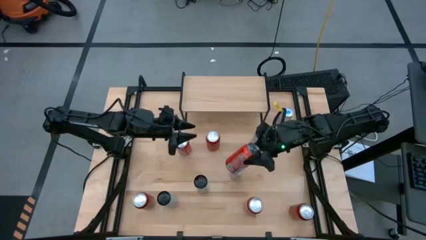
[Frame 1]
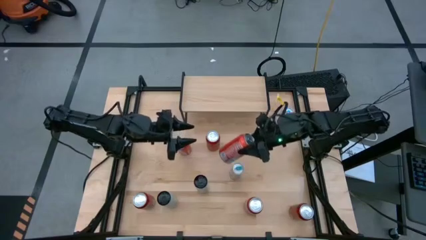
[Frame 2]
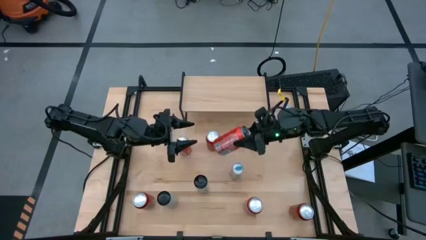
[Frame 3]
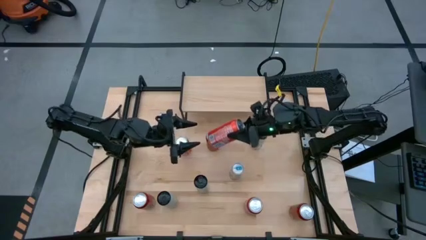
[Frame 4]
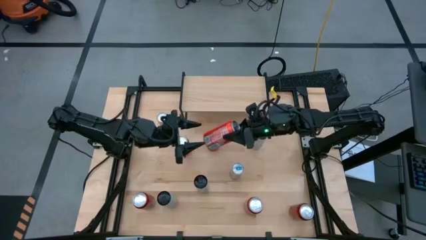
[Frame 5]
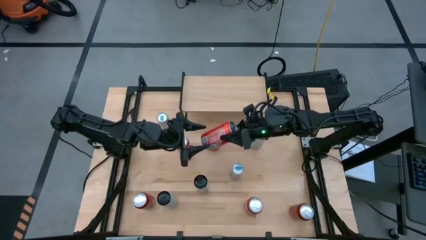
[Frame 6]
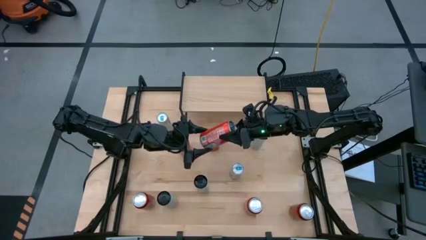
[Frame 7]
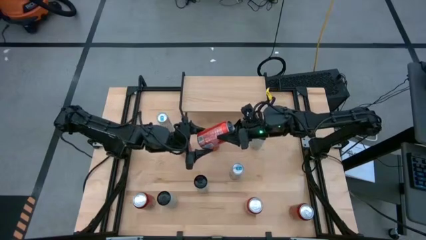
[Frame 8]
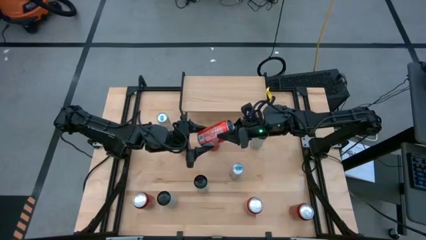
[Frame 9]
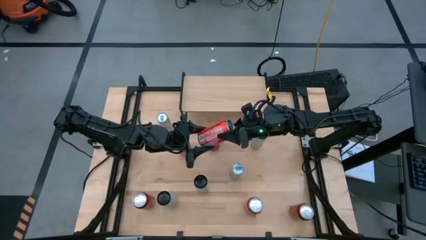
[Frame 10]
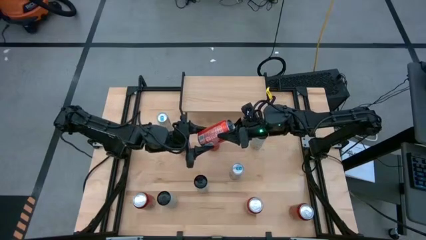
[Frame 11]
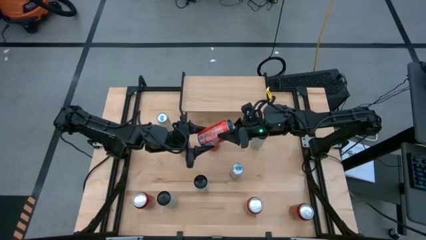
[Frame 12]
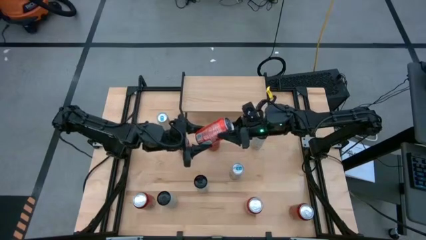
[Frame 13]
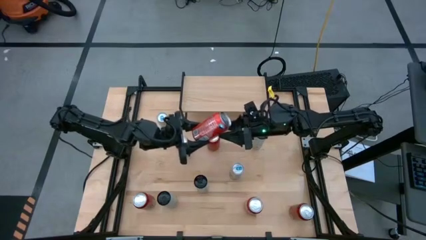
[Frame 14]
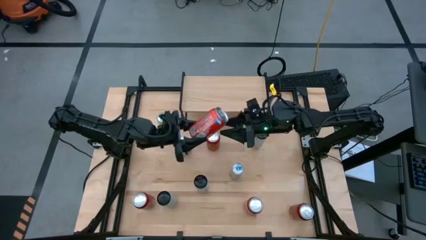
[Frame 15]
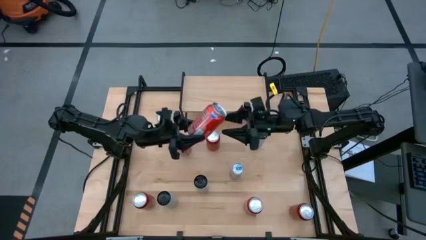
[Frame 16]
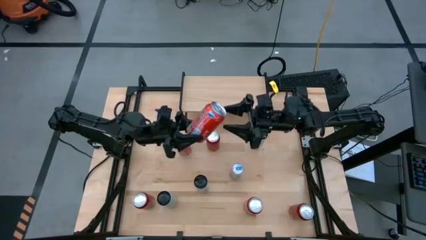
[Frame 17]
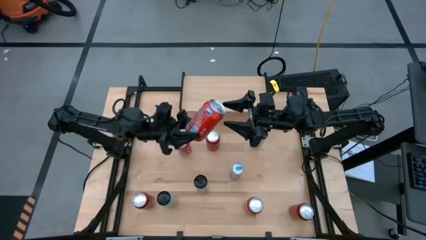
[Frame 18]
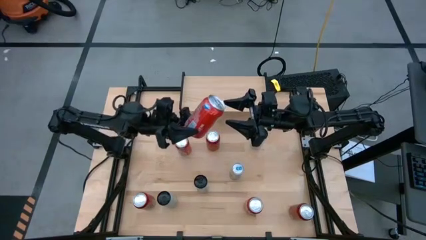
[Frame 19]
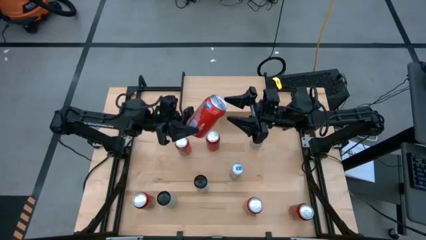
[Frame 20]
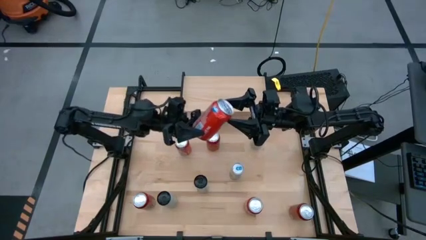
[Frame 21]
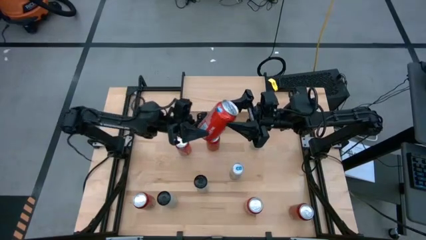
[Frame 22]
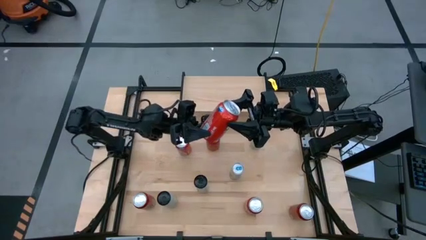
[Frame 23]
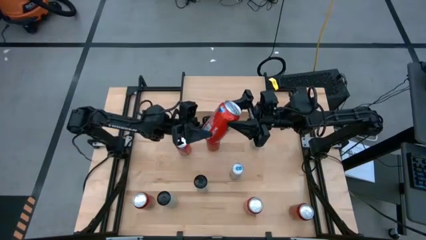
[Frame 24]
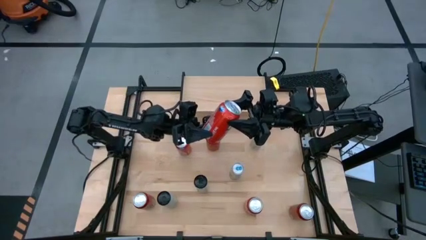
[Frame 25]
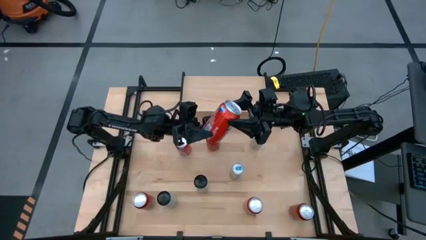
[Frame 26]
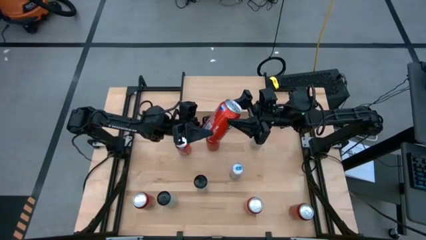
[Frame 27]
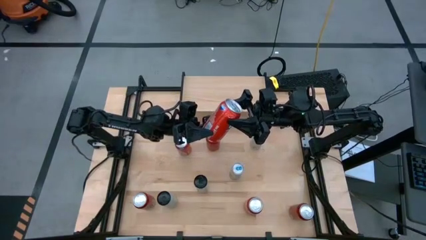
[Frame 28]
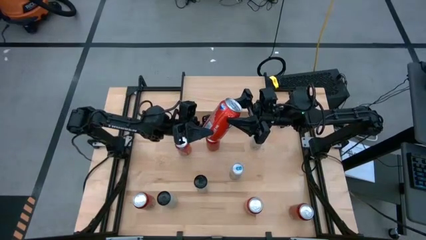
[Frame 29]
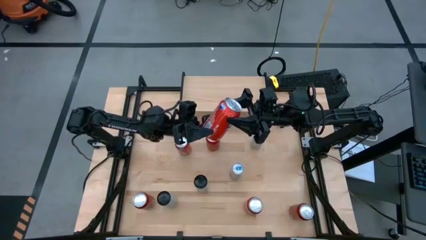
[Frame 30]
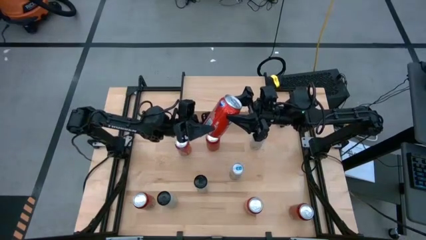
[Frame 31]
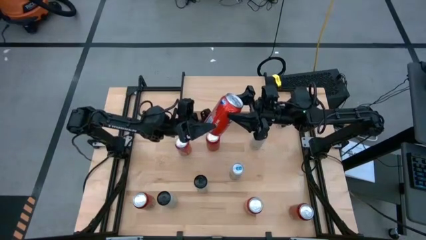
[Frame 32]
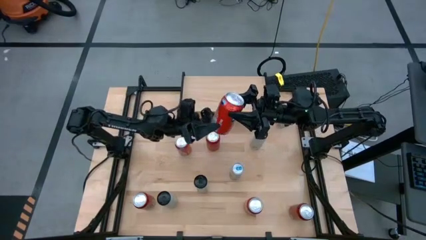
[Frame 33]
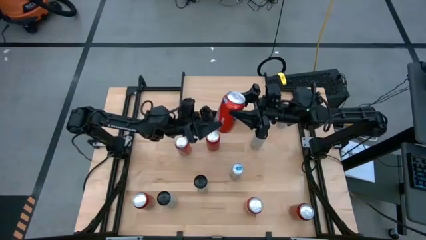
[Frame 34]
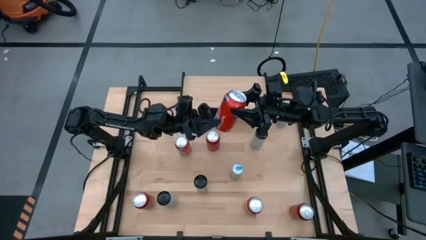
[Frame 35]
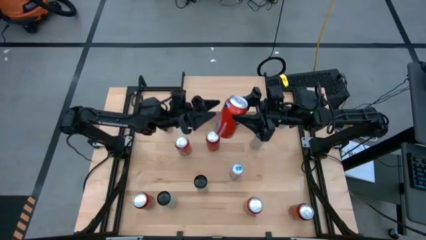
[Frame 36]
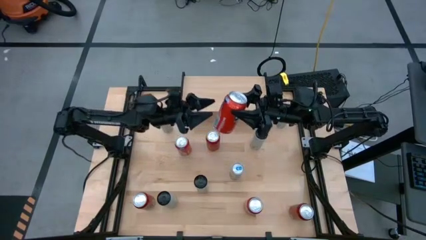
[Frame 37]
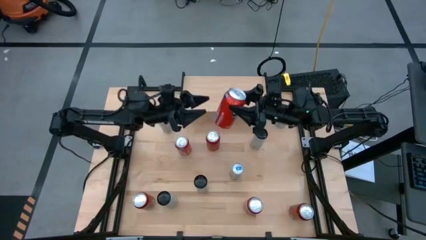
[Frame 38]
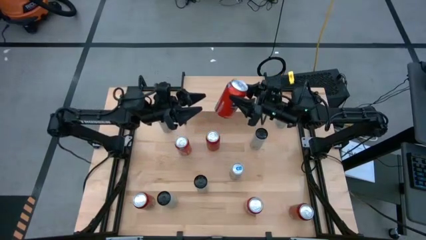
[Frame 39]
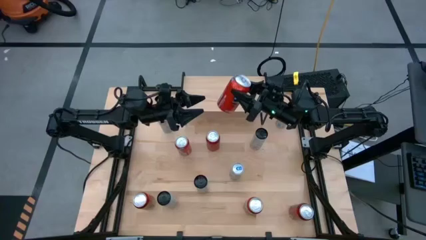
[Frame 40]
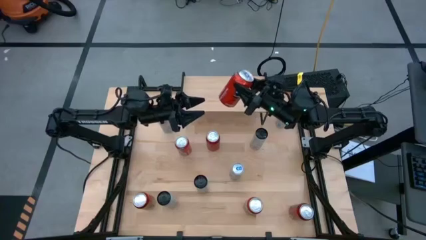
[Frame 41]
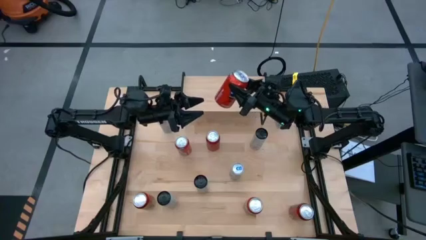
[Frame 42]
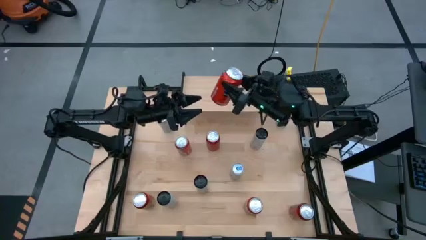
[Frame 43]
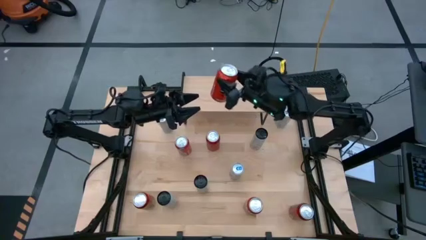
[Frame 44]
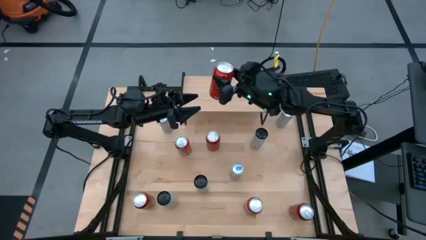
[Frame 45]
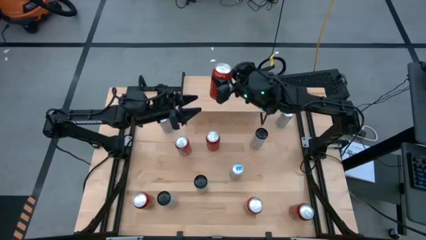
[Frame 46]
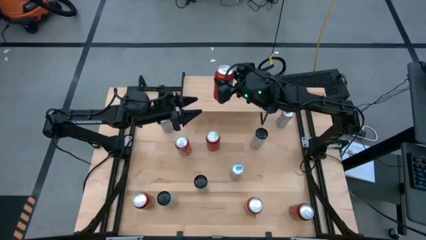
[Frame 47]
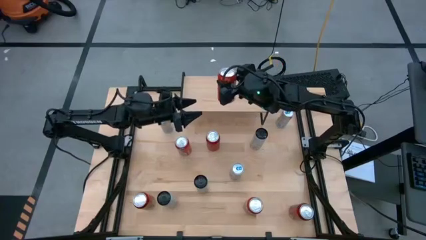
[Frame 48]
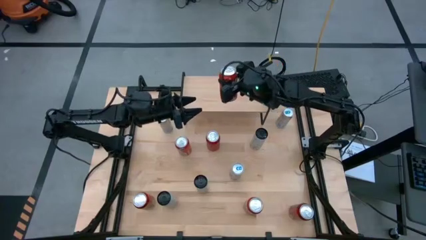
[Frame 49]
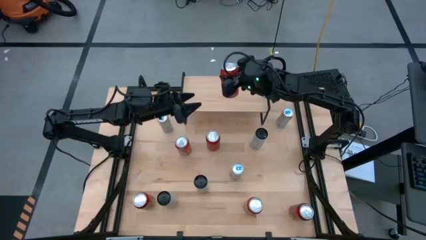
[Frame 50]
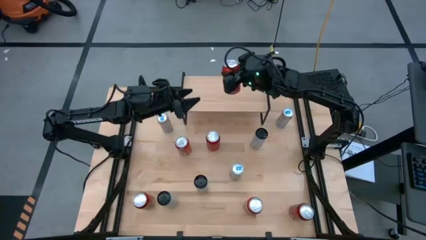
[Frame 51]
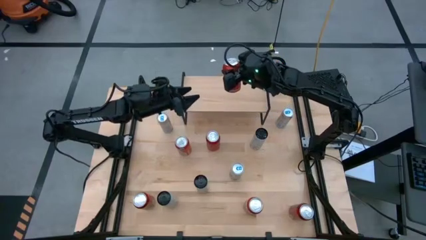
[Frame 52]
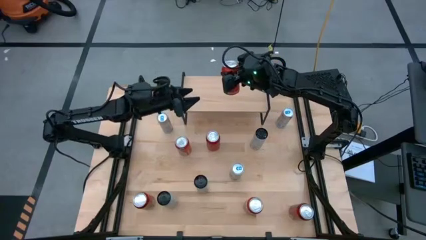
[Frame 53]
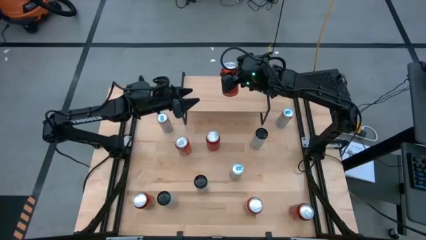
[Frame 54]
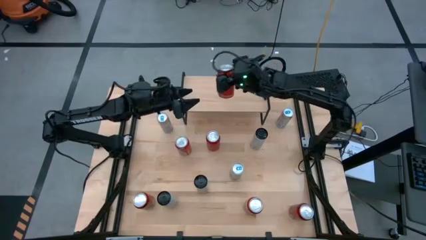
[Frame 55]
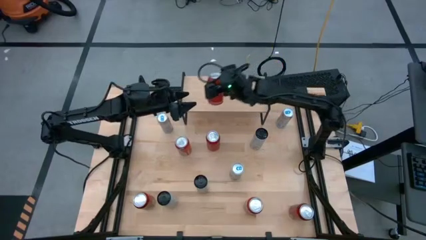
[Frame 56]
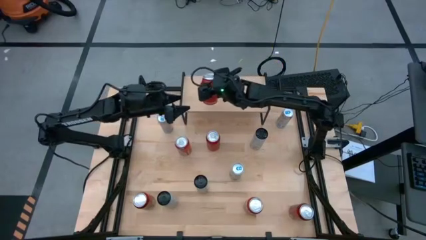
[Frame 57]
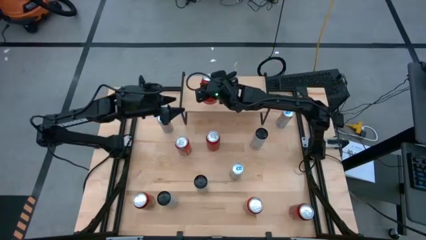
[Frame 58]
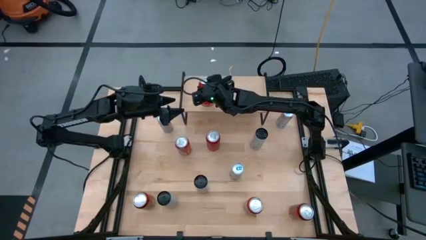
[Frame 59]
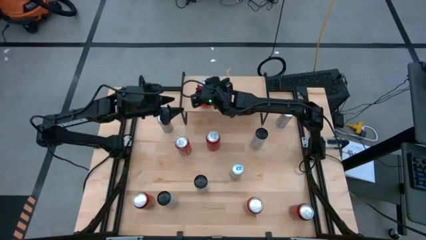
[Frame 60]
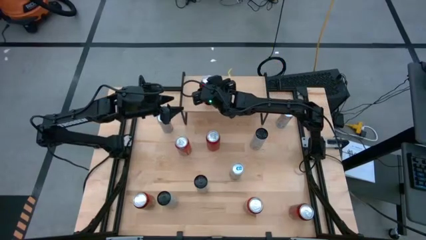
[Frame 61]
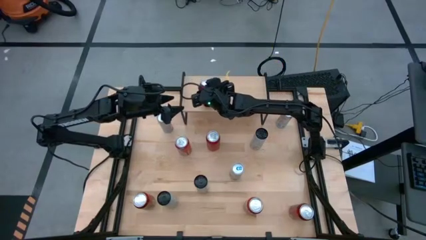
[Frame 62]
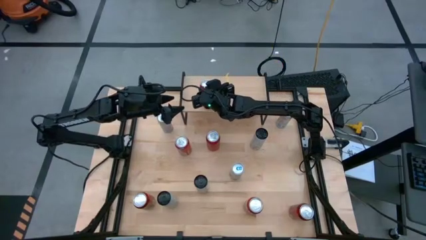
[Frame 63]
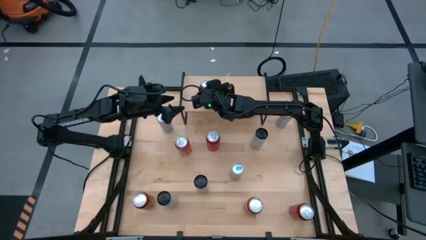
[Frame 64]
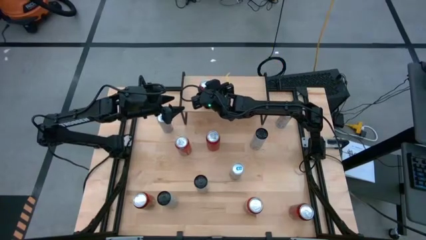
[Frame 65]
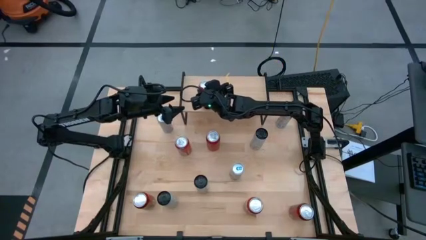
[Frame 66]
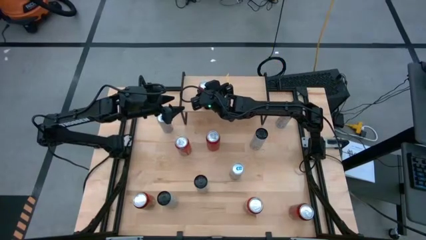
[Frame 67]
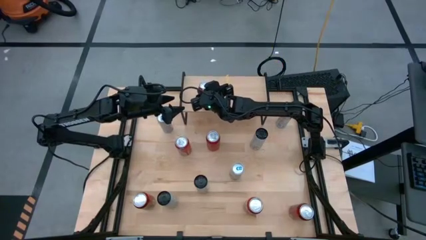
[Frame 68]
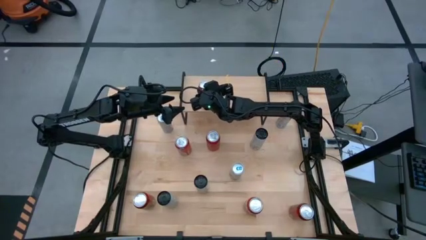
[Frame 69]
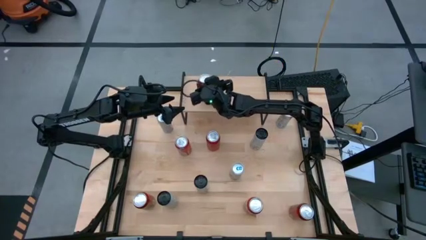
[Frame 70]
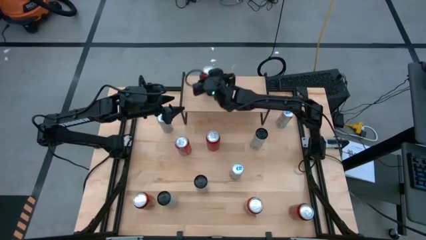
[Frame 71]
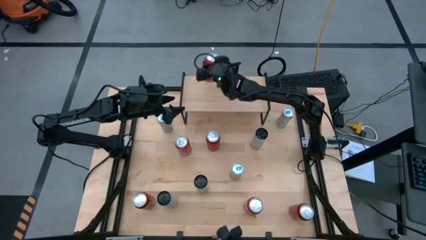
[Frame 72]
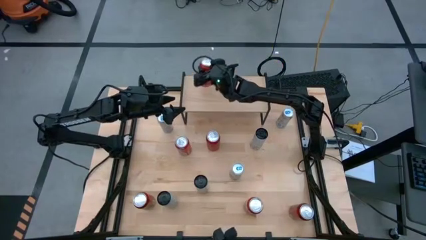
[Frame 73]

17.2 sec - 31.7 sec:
Task: Place canned beverage on shelf
Put the middle red soda can on the shelf
